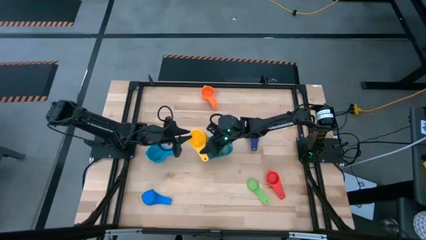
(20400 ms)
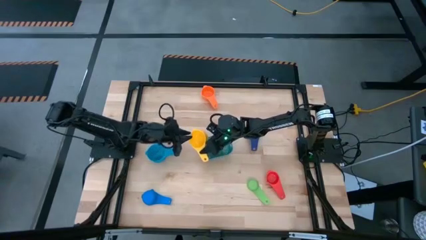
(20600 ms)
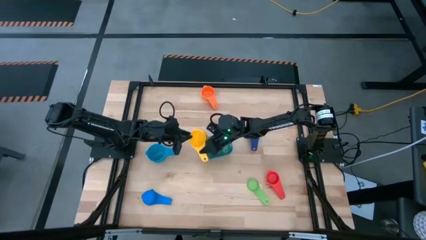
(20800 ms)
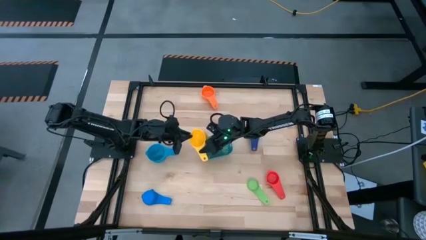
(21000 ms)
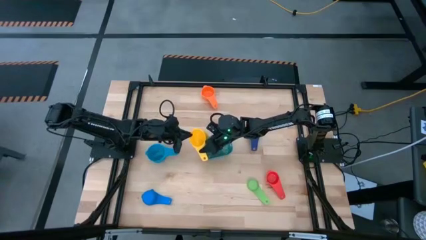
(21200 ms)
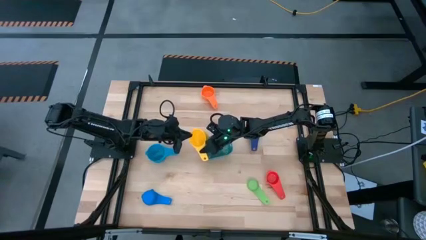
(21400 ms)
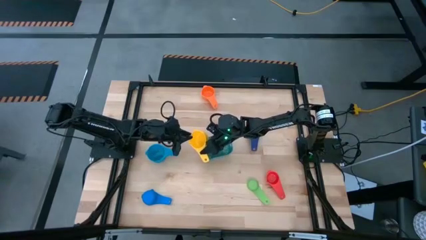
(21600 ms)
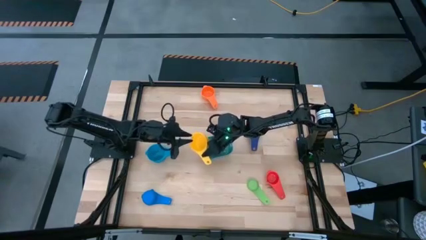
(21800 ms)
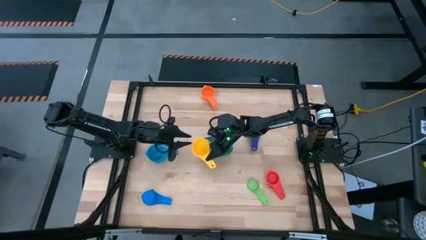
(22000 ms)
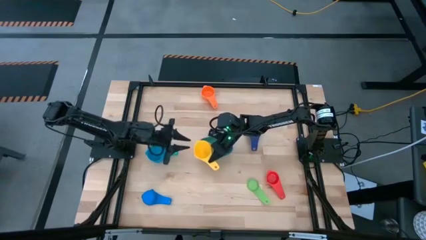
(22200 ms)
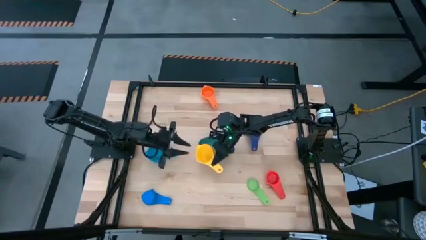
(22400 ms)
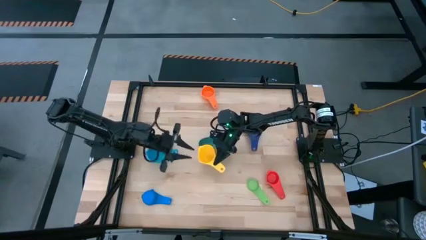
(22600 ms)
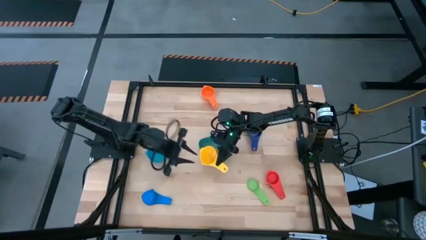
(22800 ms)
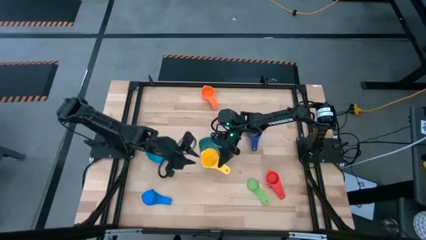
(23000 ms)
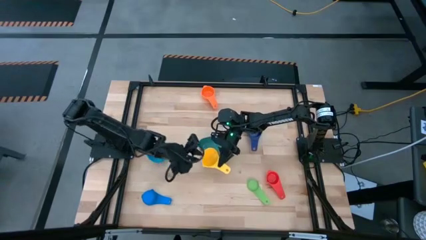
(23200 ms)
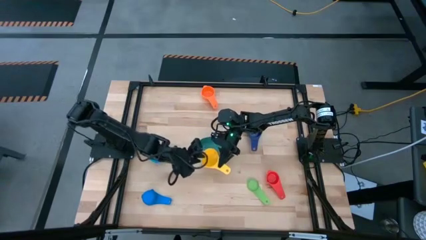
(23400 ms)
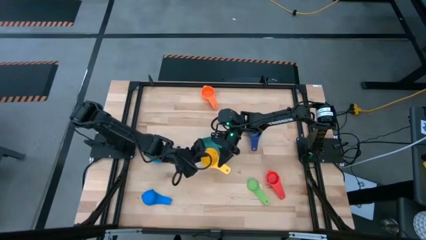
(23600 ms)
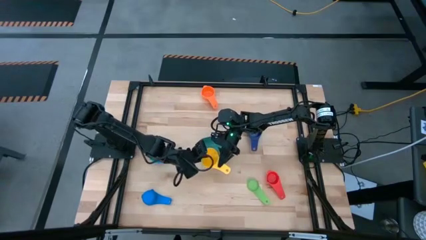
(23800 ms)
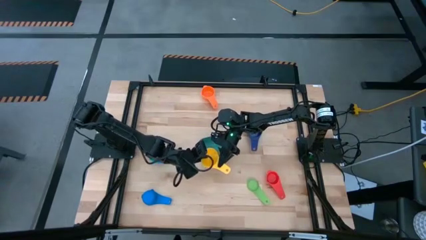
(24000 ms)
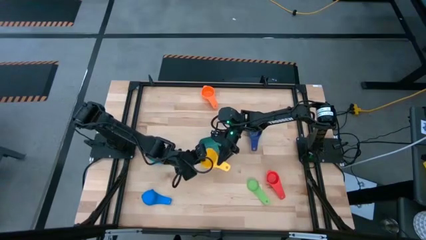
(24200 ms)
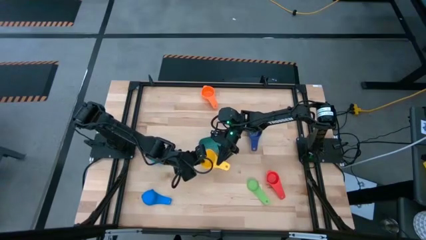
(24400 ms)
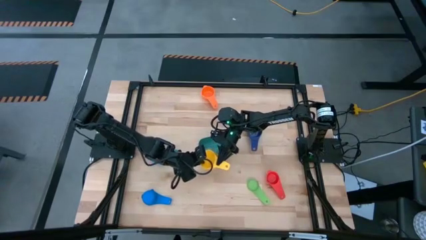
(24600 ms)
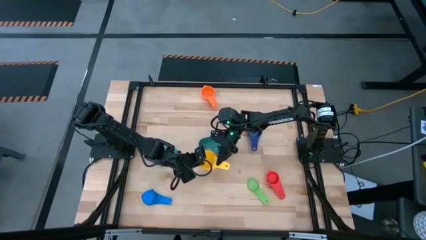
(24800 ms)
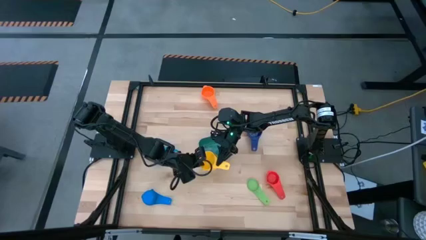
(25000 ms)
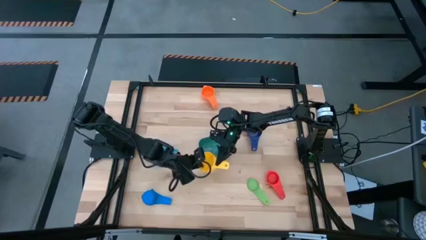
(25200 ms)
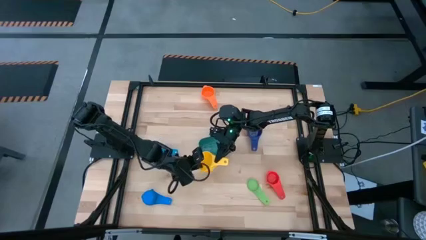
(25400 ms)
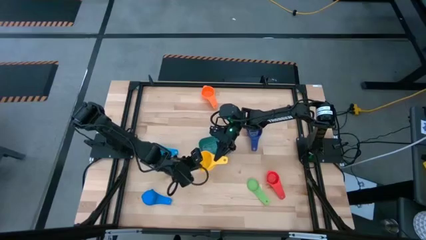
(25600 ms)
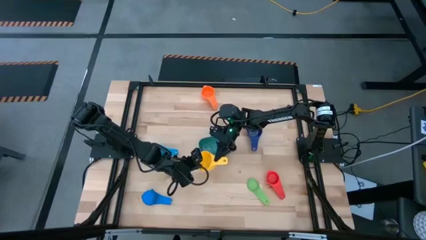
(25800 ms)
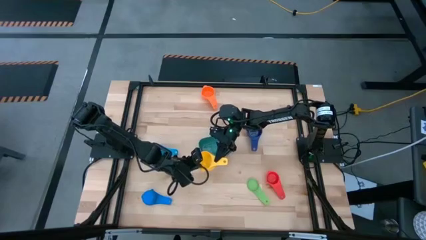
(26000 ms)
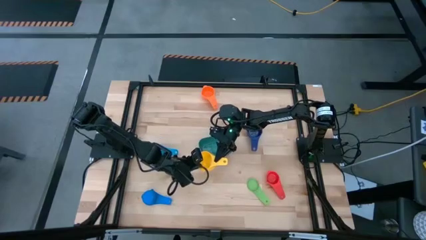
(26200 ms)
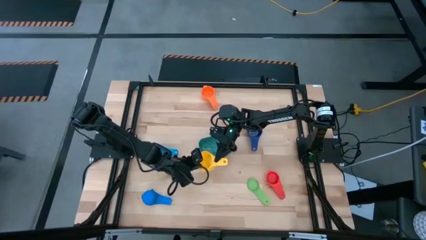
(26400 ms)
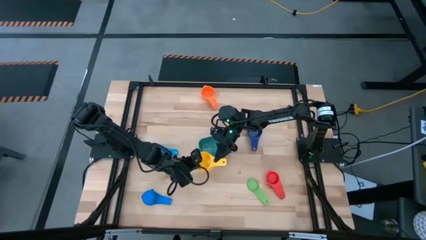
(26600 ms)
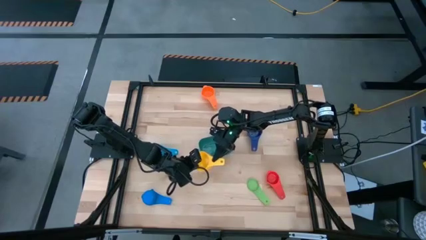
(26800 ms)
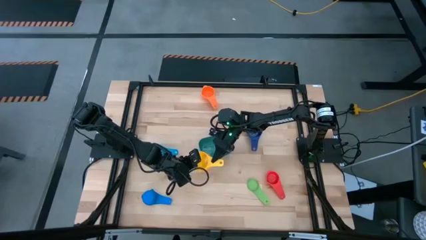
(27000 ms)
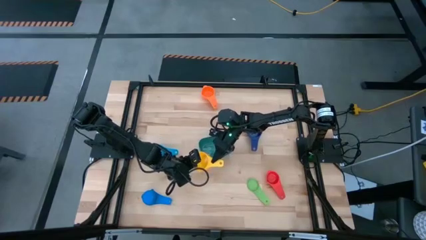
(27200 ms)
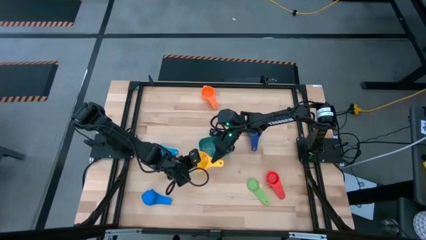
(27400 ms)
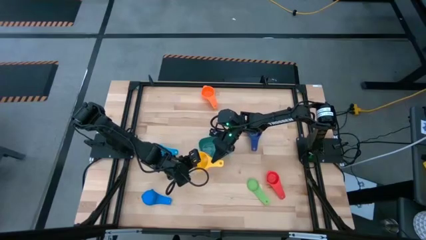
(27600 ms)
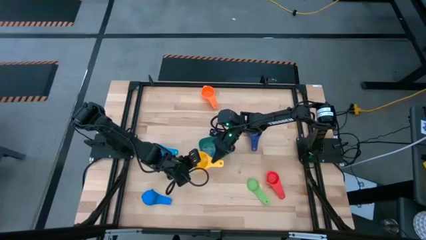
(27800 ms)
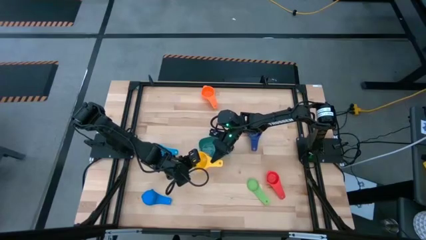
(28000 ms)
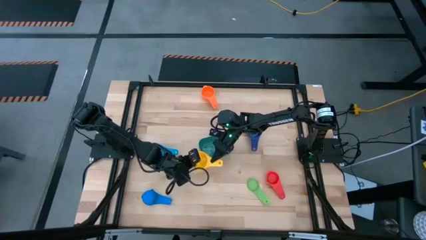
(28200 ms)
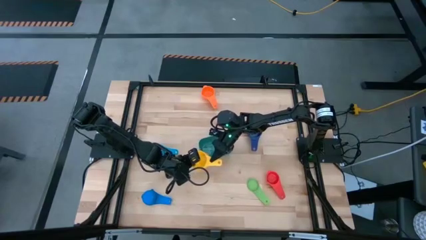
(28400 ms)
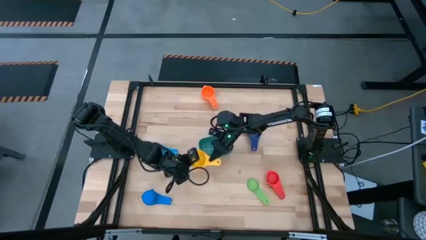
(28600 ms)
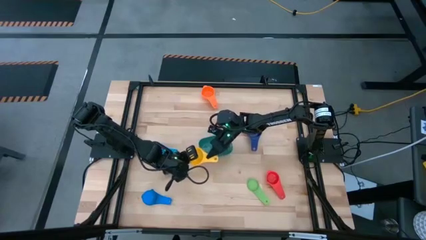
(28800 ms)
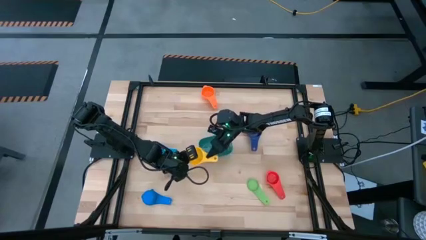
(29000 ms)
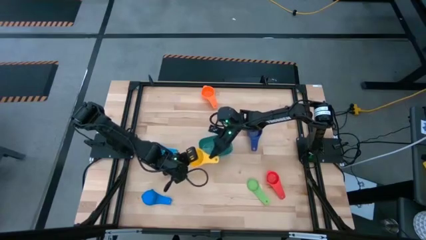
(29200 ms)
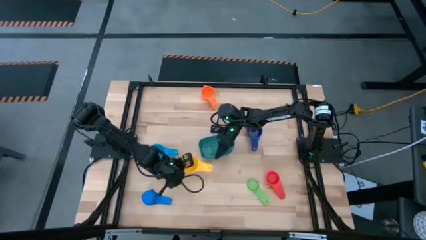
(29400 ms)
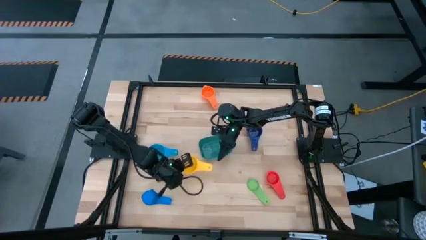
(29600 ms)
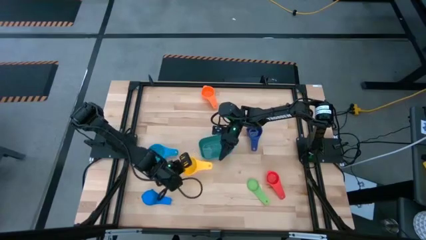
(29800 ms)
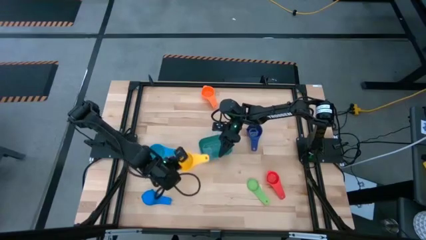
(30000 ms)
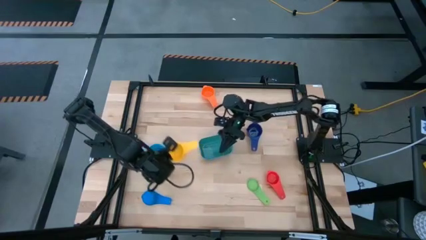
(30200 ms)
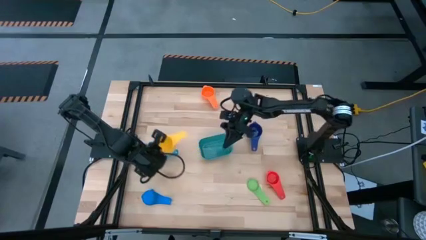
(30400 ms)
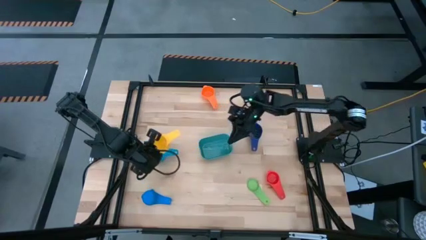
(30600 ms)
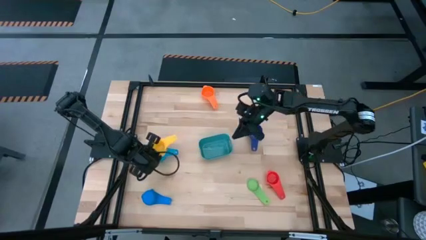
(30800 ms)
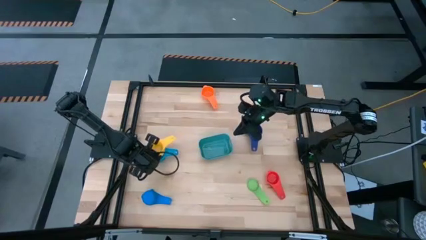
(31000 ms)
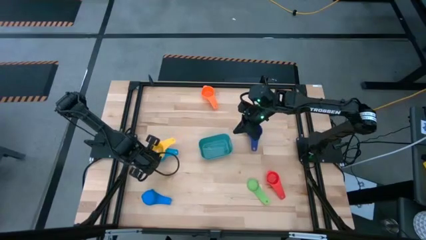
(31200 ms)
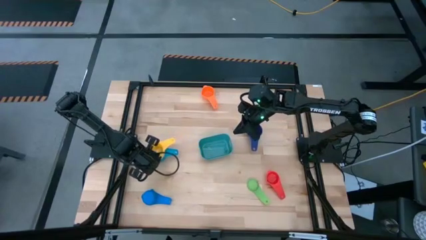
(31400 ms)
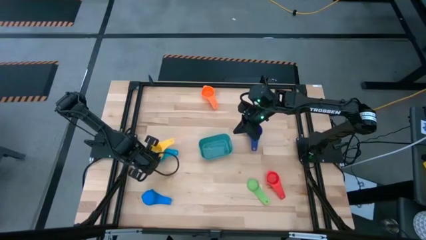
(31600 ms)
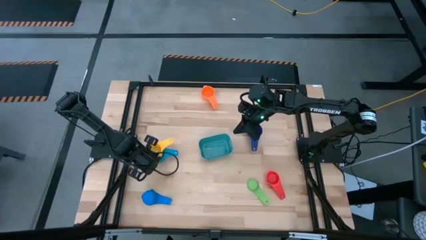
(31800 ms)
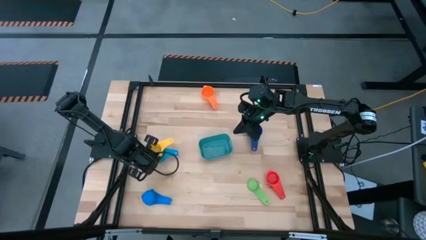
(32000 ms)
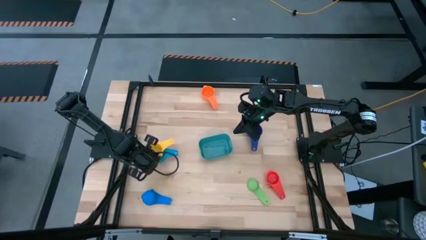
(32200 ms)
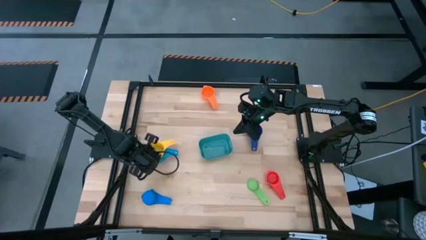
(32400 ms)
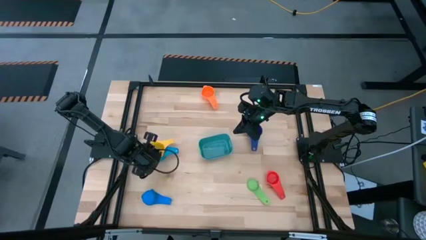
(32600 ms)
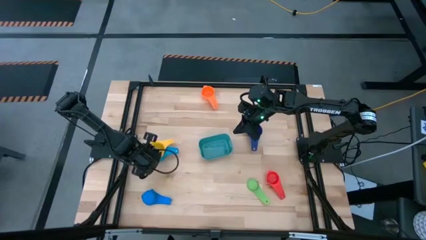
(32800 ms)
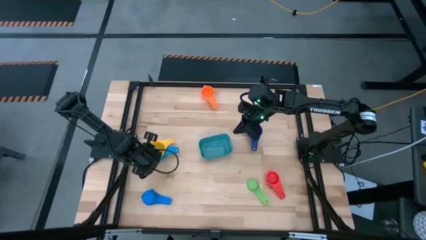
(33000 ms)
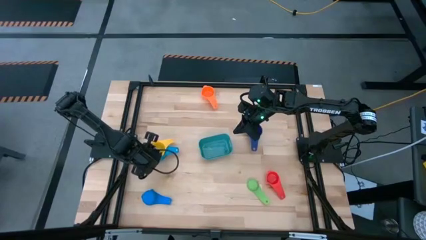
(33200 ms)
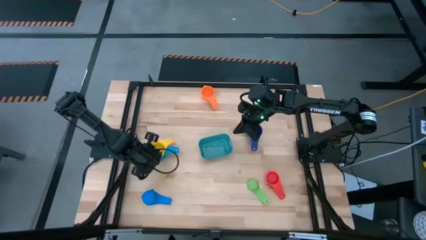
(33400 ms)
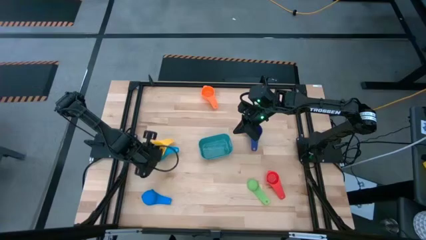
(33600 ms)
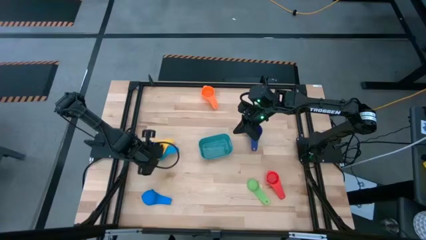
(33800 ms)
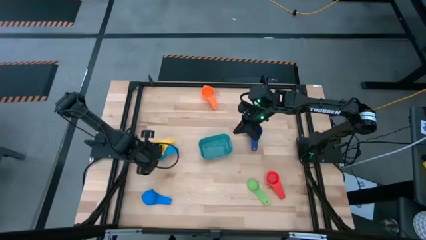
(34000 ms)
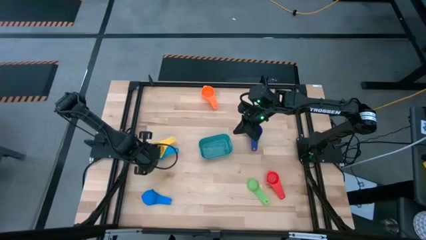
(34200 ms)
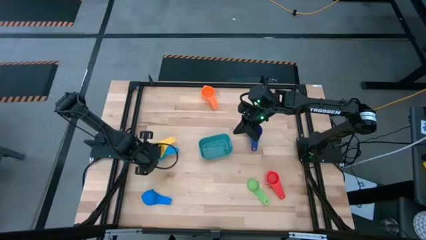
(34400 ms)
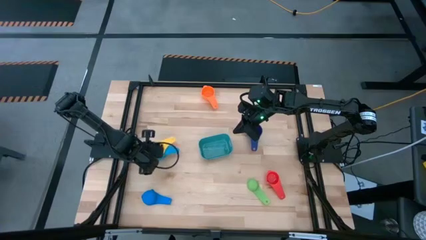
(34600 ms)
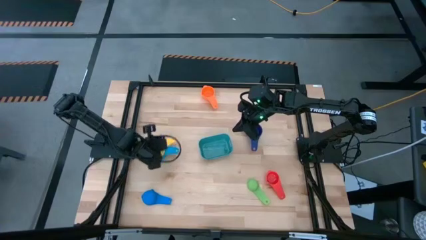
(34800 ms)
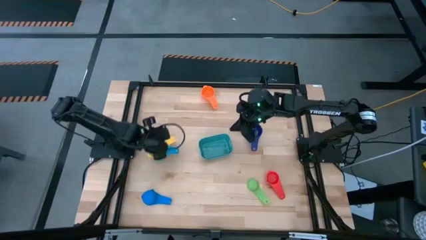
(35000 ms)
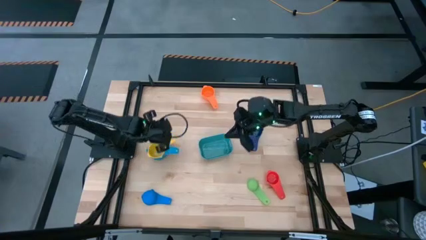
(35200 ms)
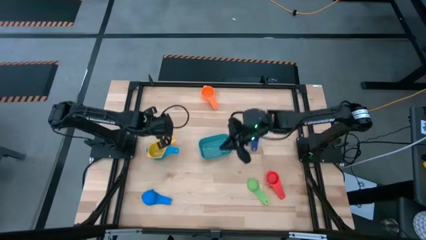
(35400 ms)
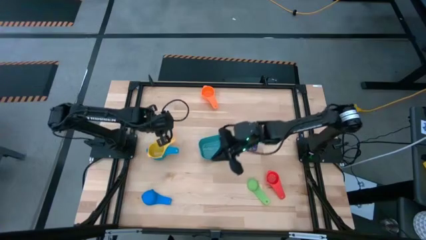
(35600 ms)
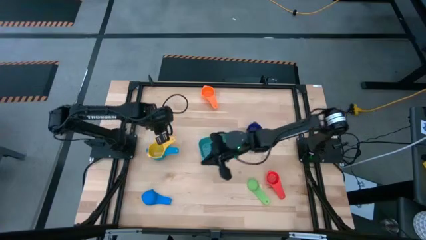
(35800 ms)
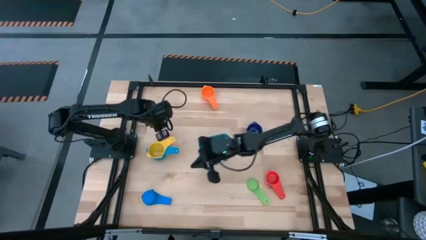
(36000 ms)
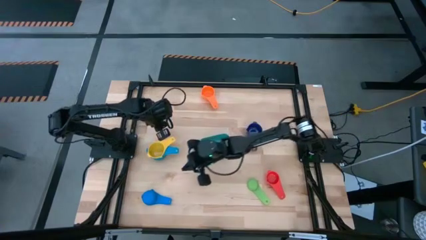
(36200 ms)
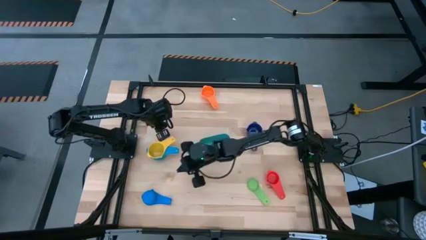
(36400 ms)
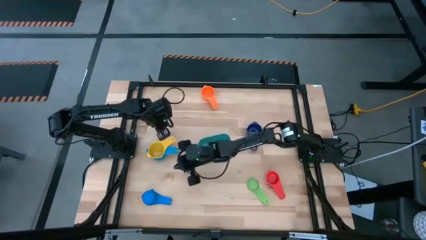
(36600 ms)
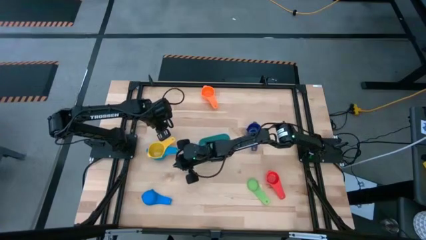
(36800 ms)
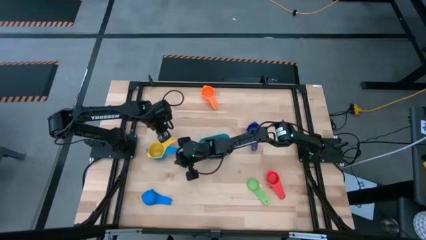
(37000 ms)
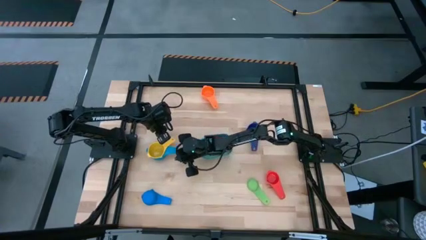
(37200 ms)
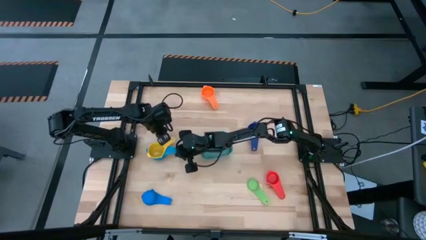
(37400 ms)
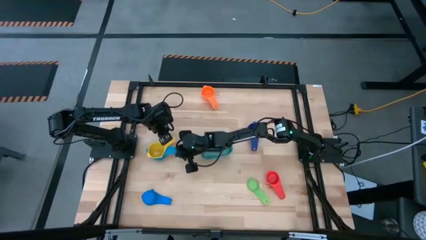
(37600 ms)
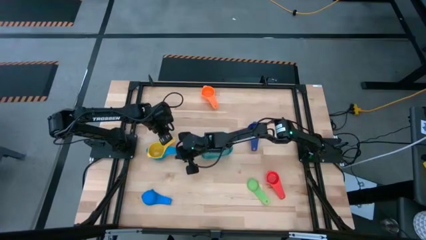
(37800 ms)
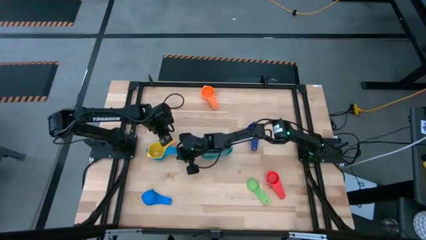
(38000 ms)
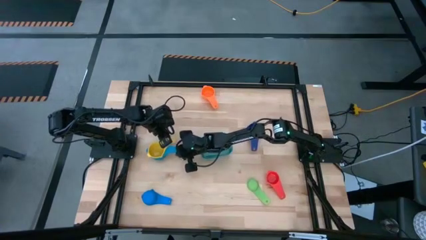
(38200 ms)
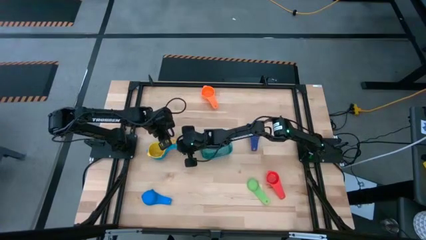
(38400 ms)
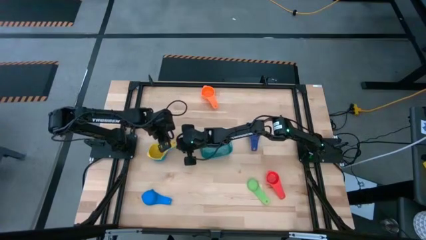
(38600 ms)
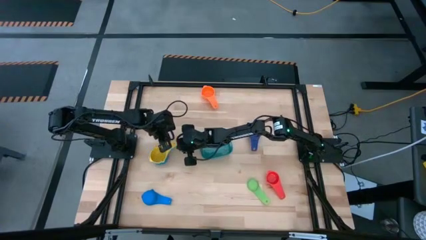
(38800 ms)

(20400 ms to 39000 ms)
Task: Nest measuring cups in basket
Stack the yellow measuring cup on top of the light blue measuring cup
